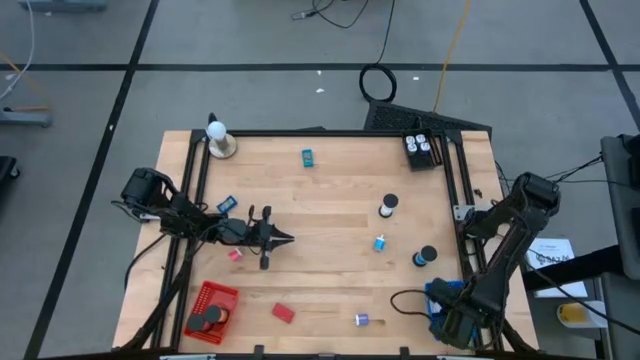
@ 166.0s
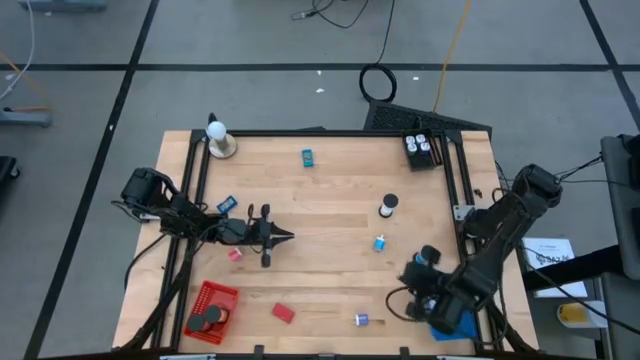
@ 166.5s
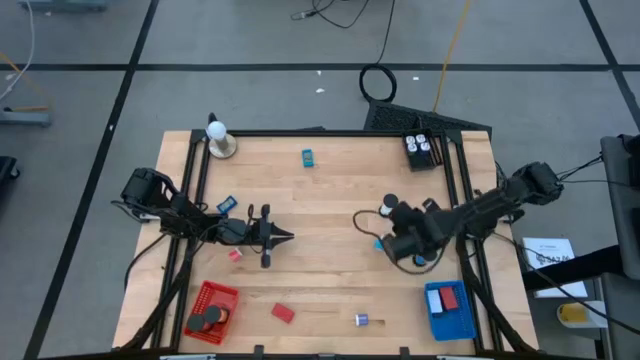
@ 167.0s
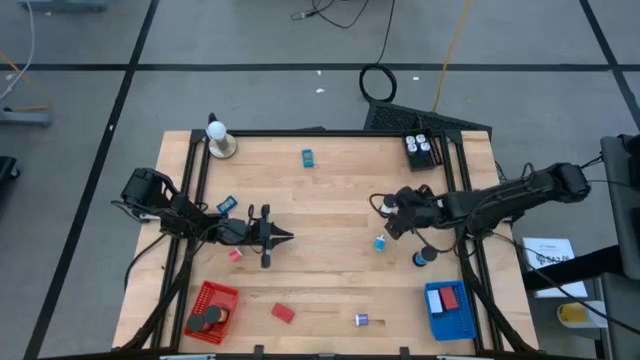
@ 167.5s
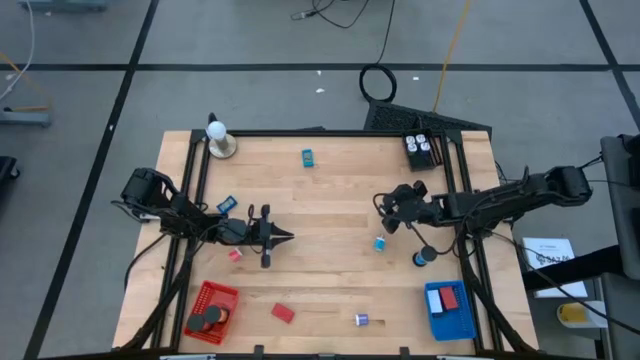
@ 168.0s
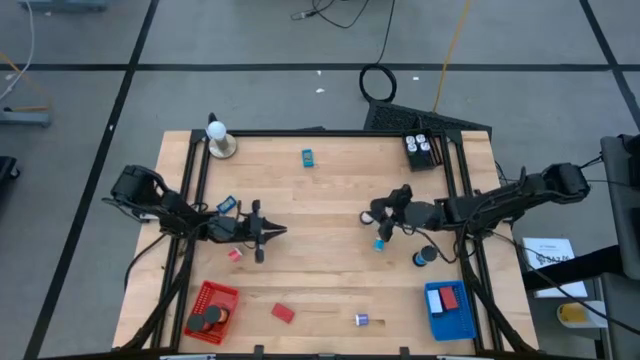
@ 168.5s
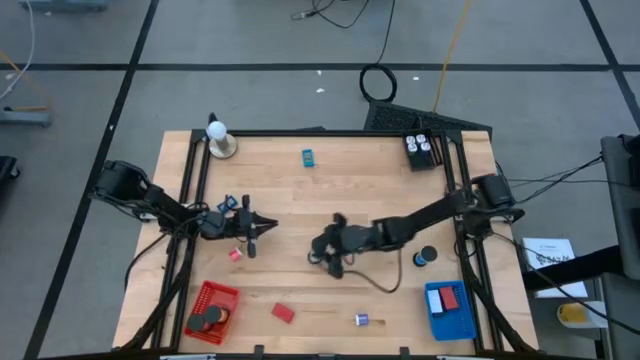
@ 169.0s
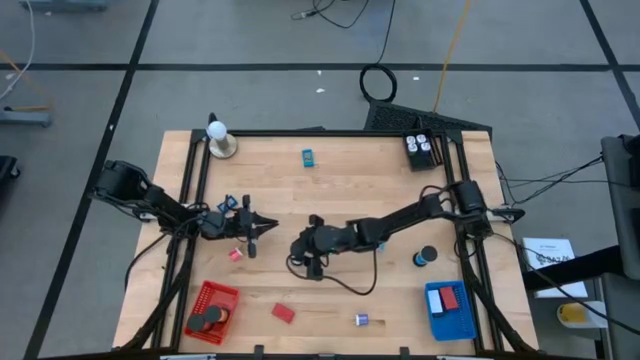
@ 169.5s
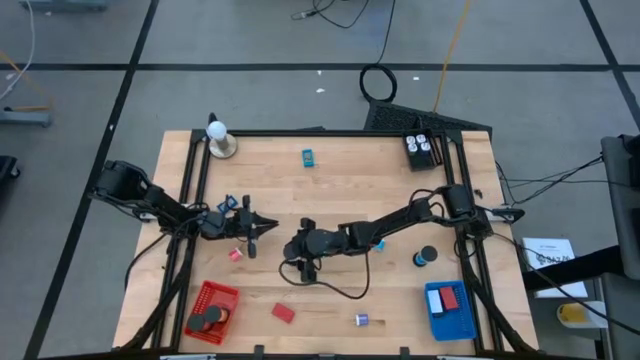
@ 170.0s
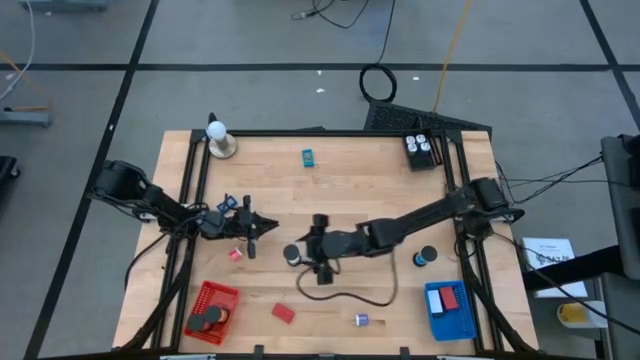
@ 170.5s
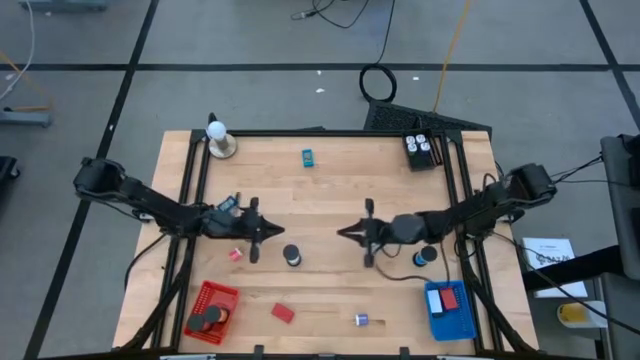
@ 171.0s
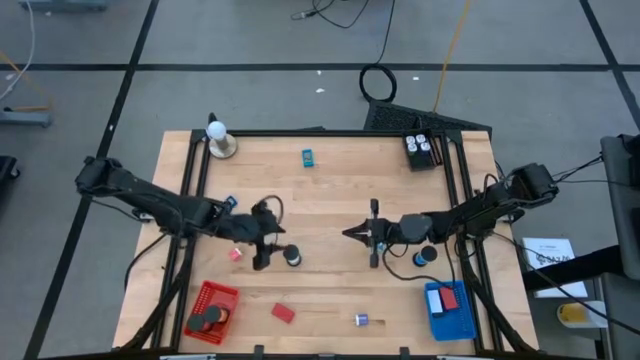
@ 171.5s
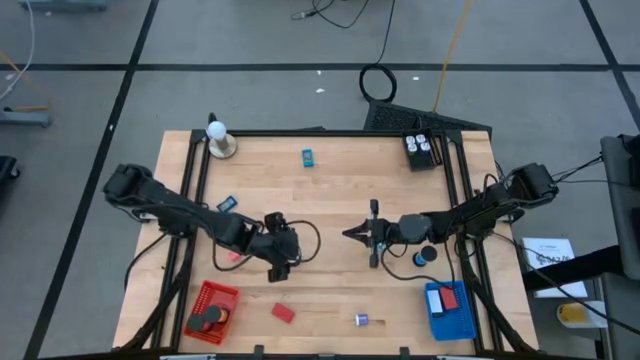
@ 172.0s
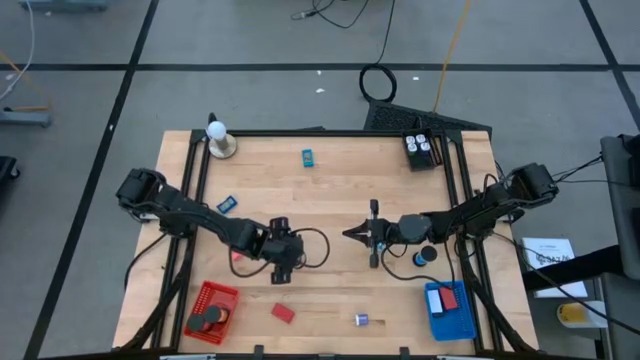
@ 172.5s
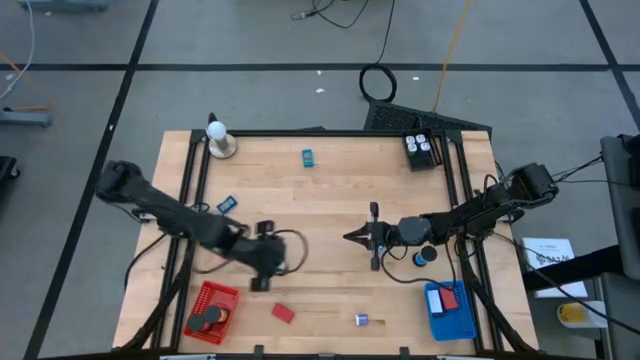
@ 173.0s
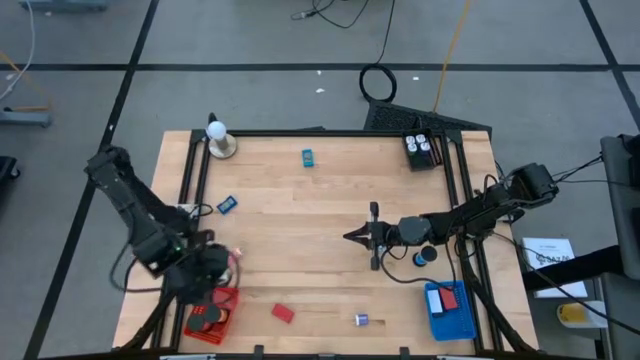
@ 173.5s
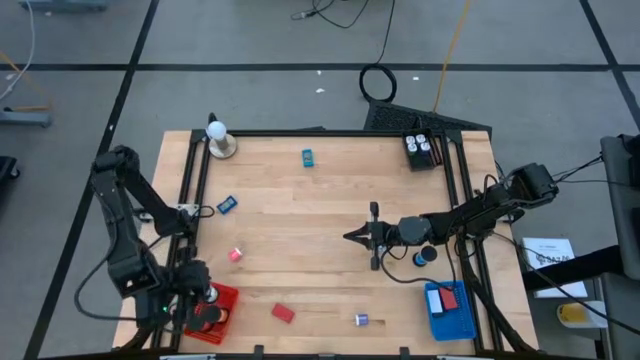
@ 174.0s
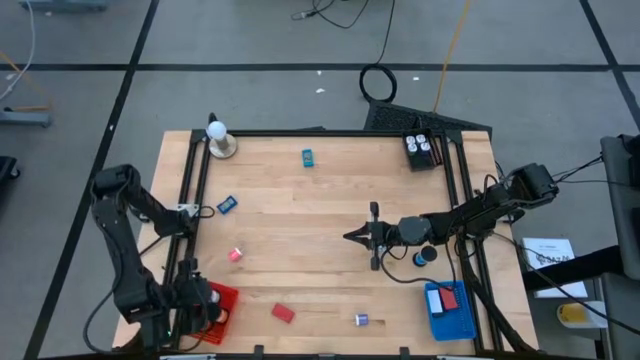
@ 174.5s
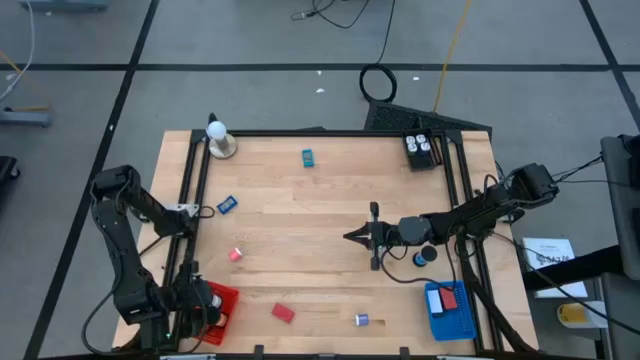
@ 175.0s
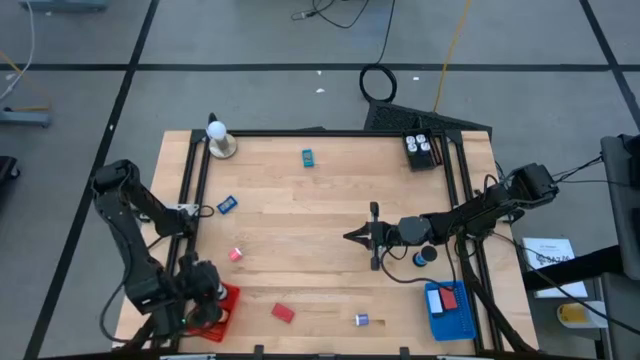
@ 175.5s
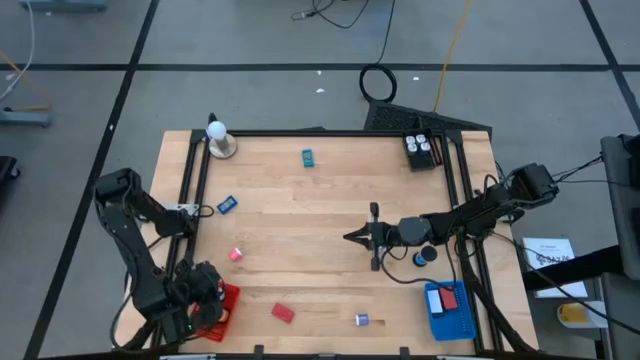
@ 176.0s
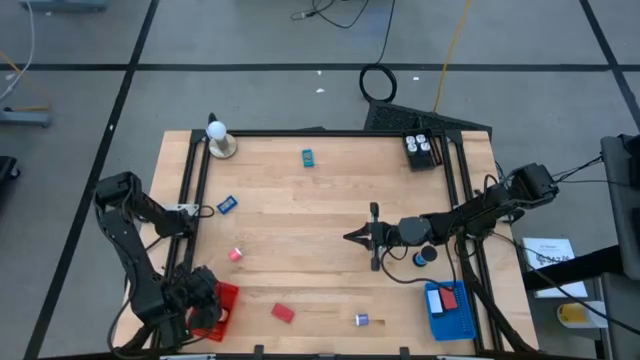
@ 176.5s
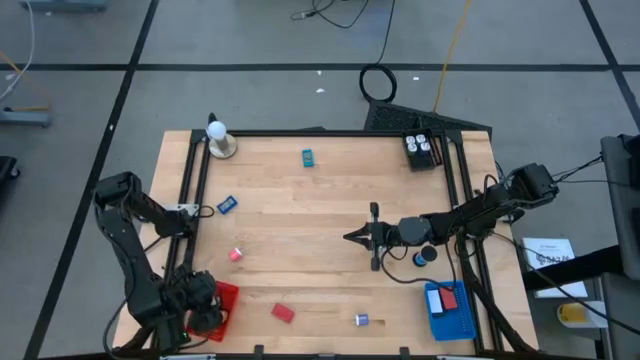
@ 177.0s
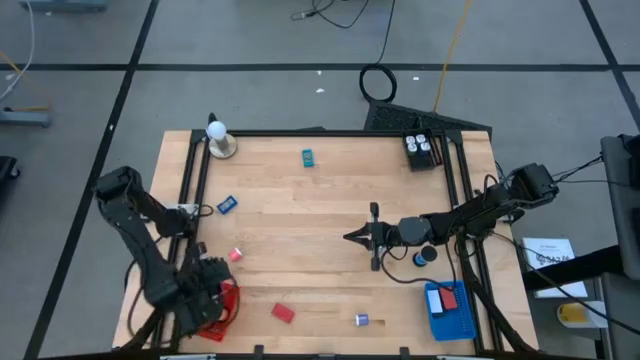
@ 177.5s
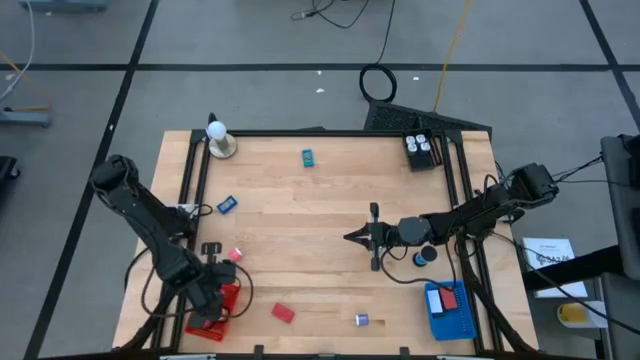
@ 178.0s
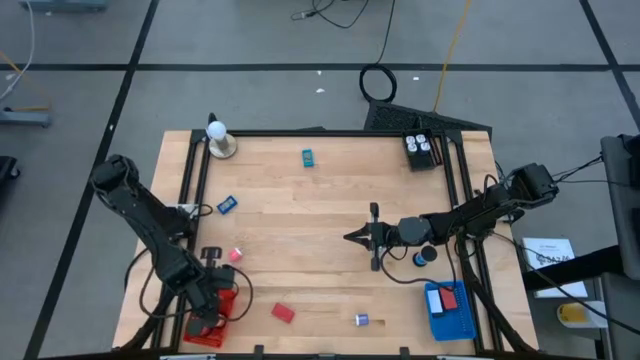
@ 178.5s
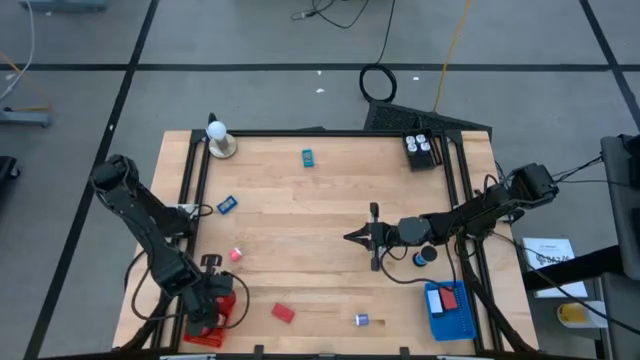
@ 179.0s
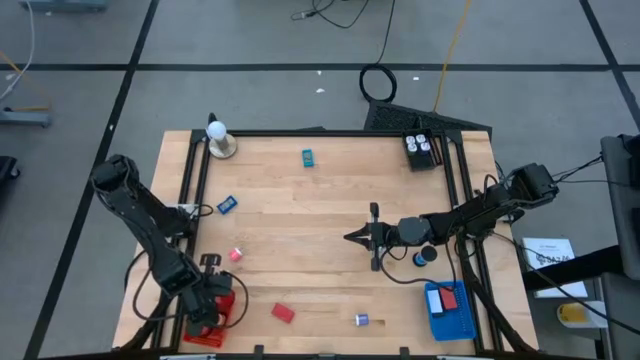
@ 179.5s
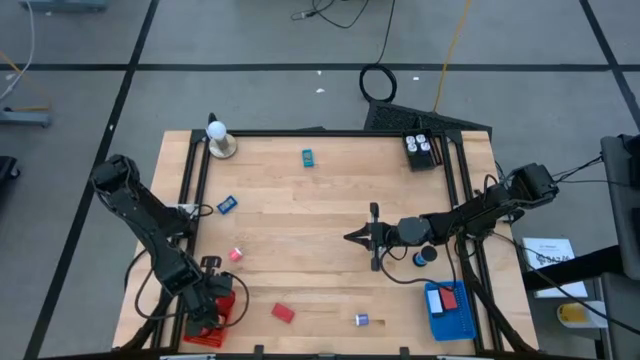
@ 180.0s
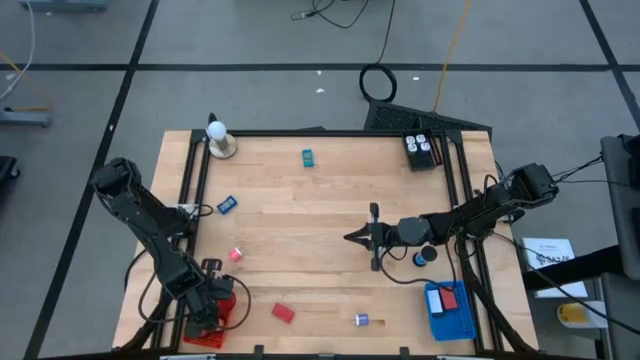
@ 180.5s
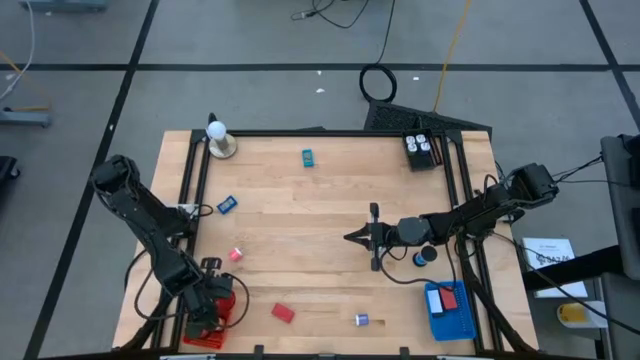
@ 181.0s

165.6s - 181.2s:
Task: Pick & Place Office items
Put the white hourglass into the red bin

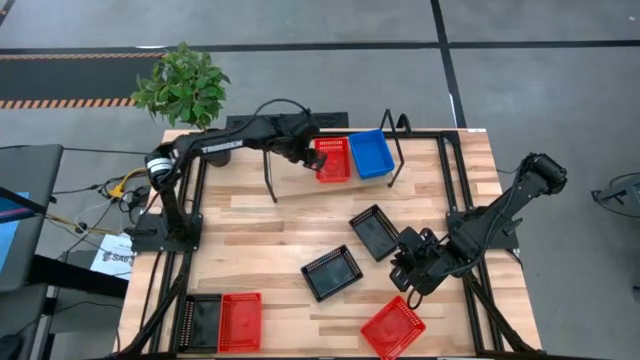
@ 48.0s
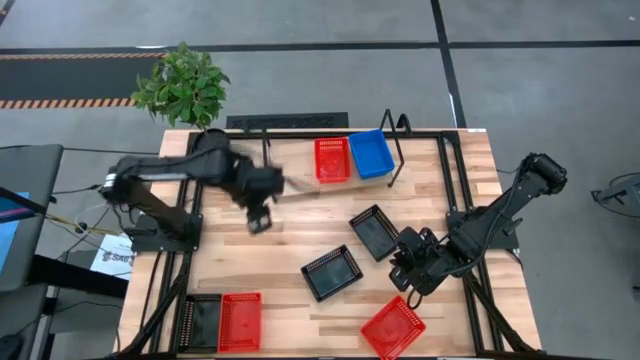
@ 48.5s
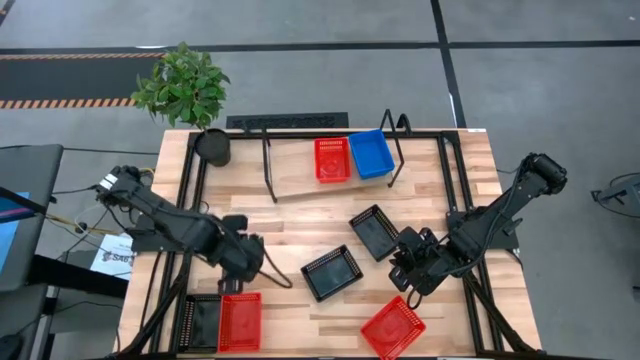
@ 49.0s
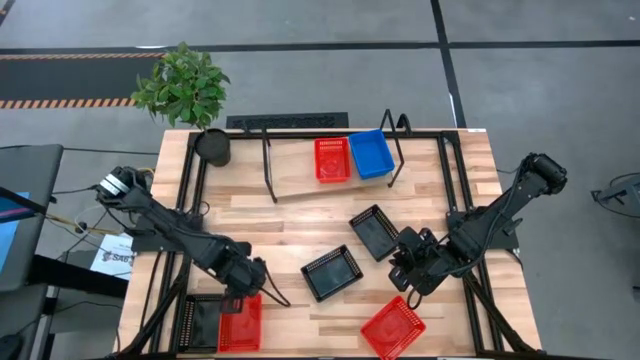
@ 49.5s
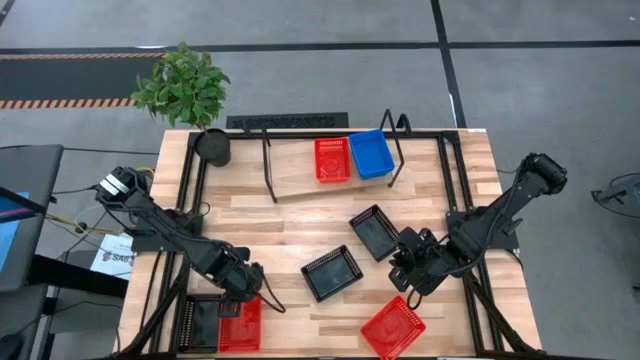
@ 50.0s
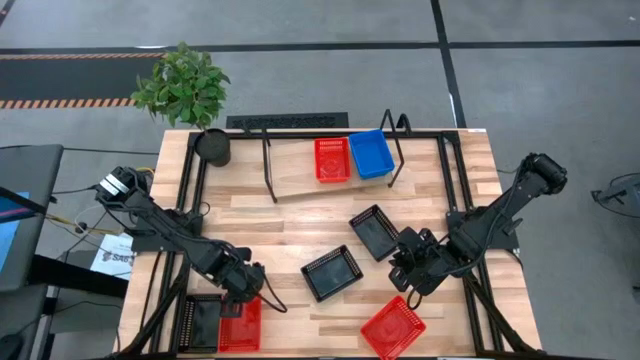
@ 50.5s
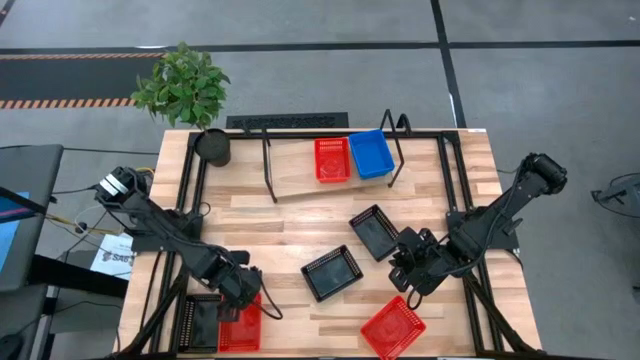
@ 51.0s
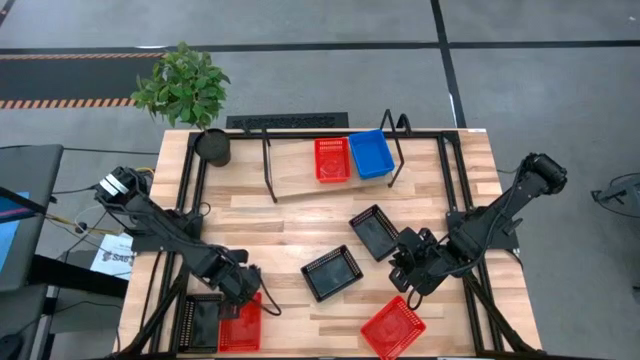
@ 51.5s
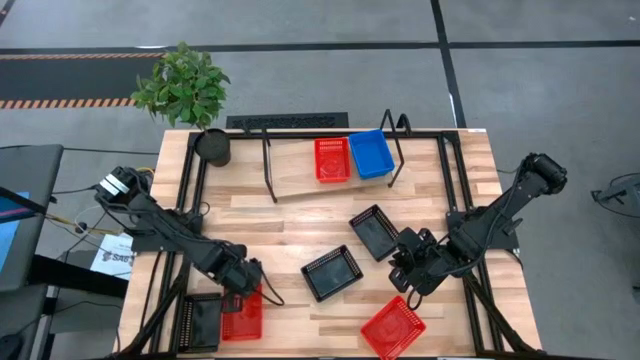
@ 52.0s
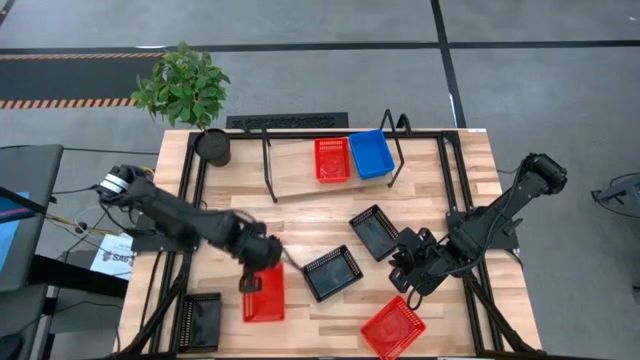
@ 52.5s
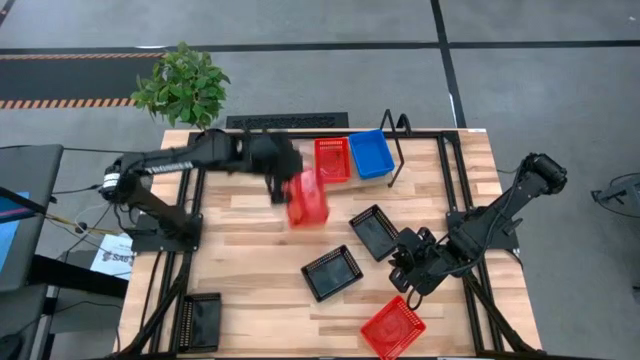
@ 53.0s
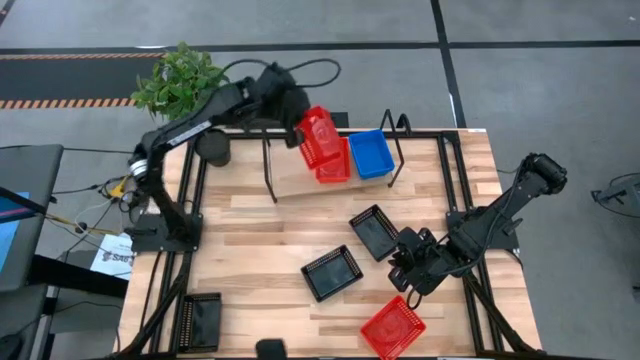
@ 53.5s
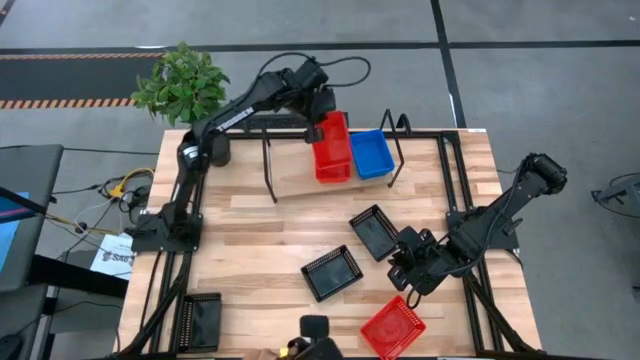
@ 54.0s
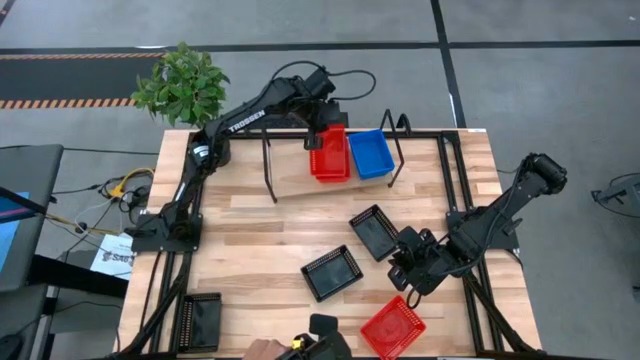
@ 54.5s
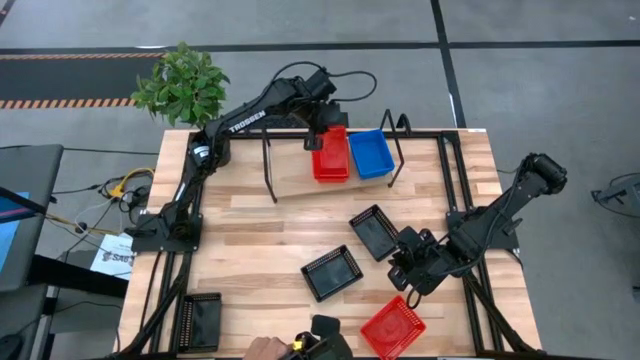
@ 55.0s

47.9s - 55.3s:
Task: Stack baskets on shelf by color
Stack the left red bin on the top of the red bin on the shelf
